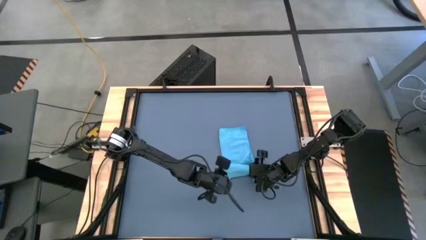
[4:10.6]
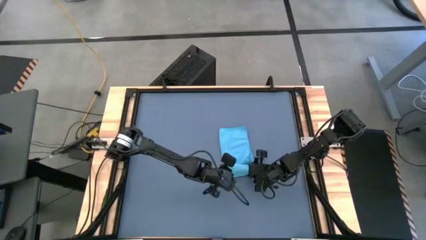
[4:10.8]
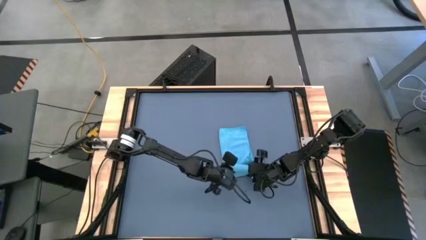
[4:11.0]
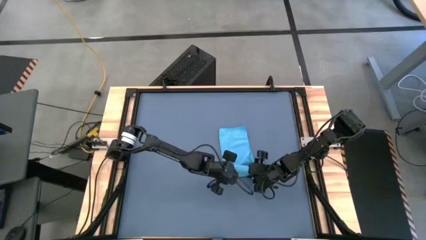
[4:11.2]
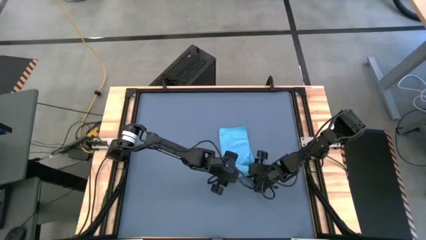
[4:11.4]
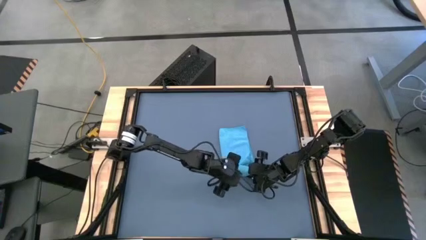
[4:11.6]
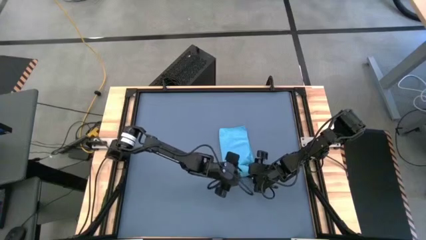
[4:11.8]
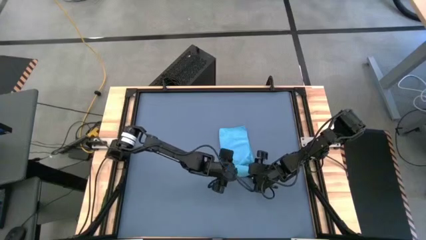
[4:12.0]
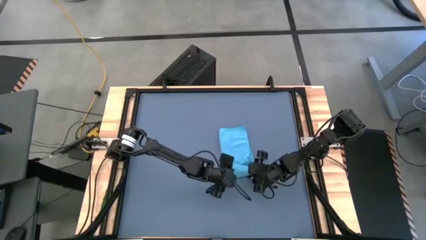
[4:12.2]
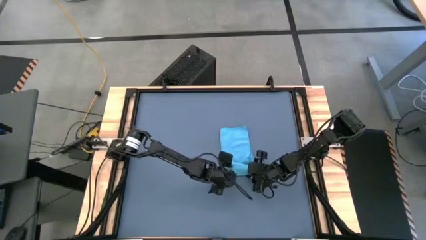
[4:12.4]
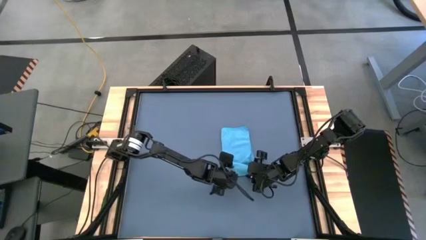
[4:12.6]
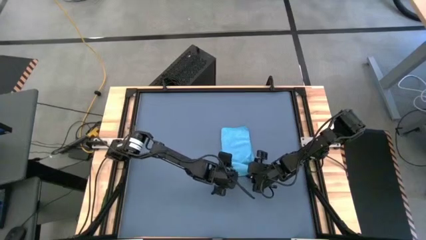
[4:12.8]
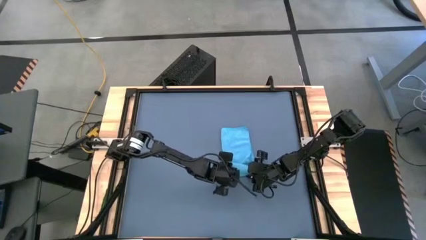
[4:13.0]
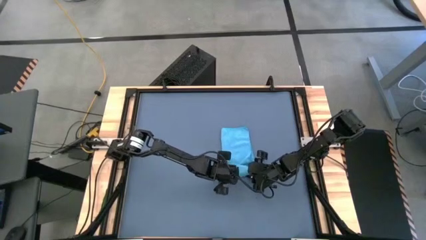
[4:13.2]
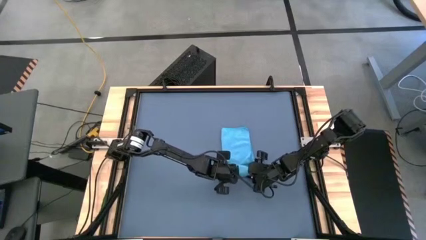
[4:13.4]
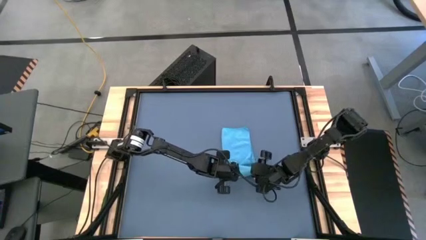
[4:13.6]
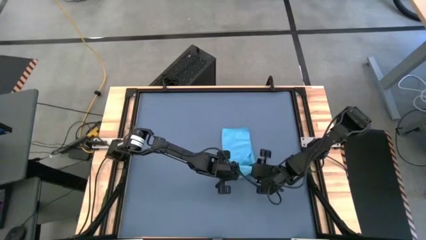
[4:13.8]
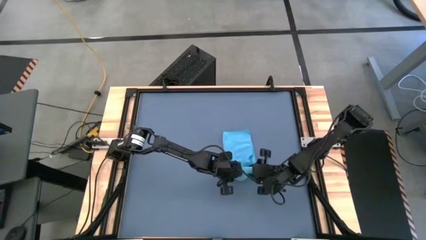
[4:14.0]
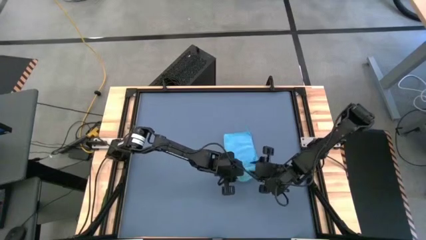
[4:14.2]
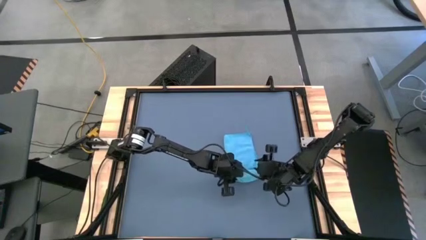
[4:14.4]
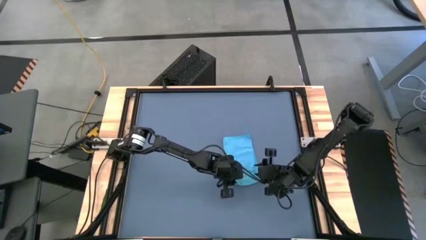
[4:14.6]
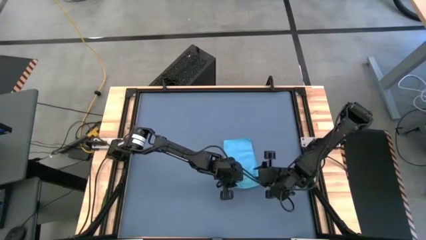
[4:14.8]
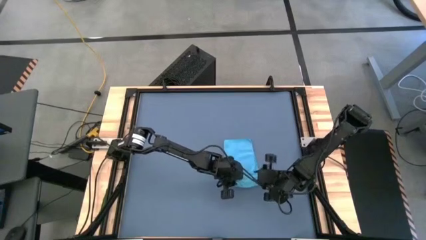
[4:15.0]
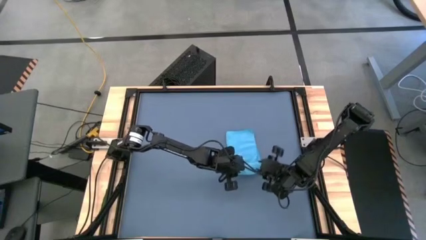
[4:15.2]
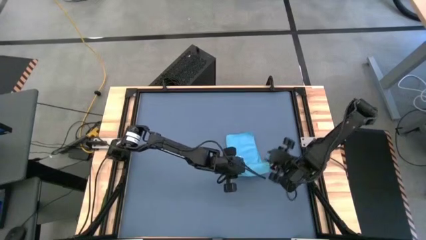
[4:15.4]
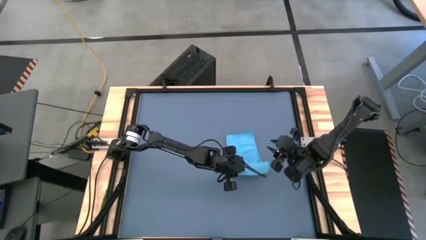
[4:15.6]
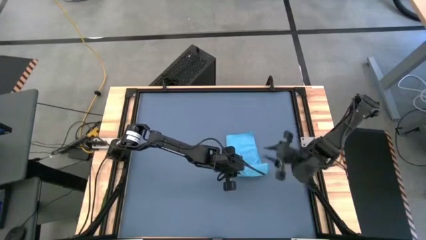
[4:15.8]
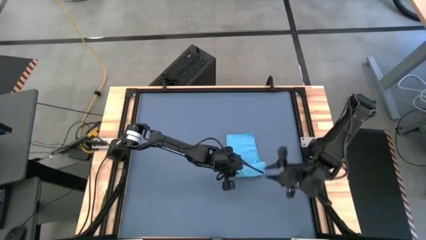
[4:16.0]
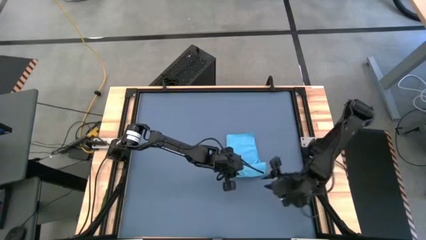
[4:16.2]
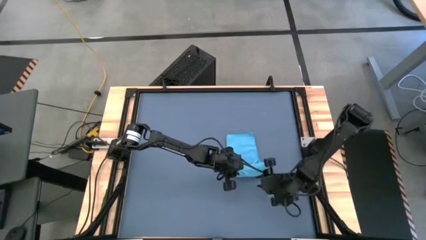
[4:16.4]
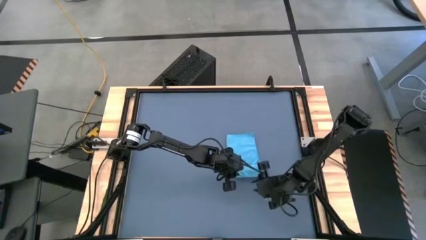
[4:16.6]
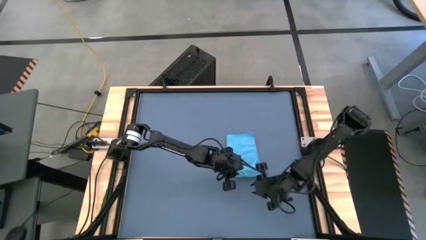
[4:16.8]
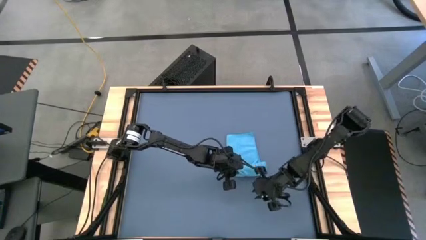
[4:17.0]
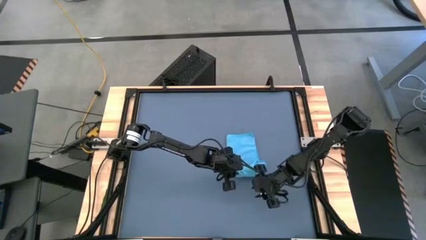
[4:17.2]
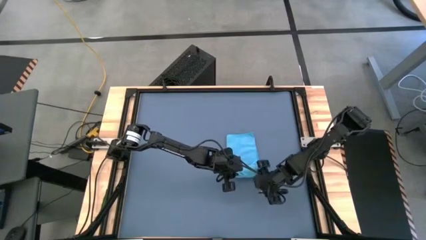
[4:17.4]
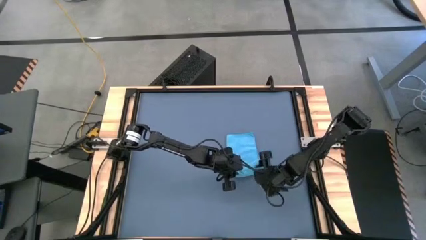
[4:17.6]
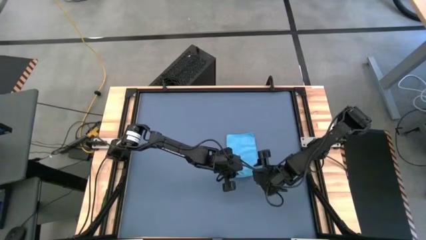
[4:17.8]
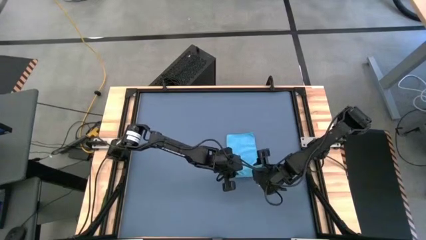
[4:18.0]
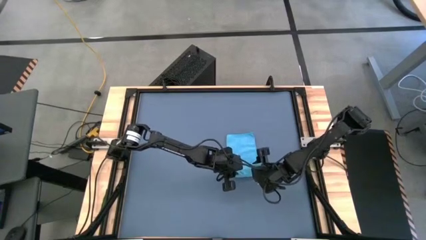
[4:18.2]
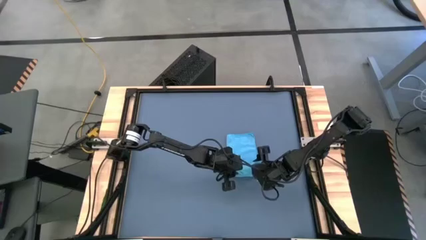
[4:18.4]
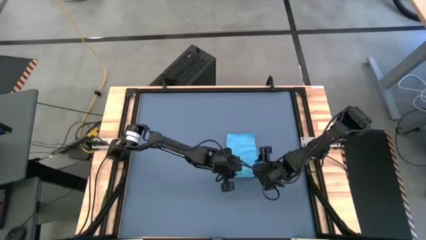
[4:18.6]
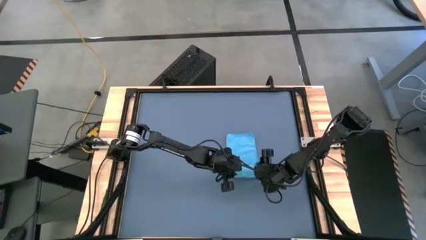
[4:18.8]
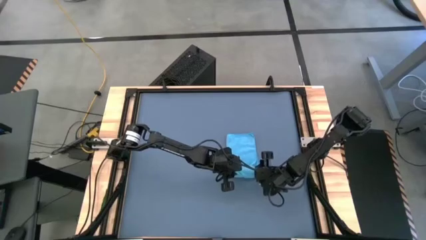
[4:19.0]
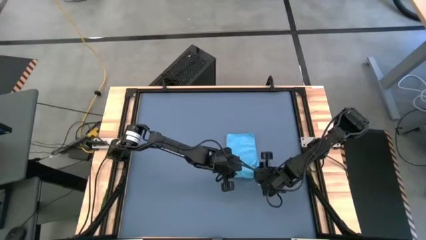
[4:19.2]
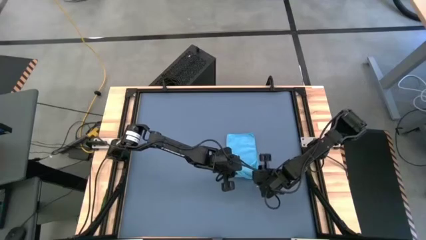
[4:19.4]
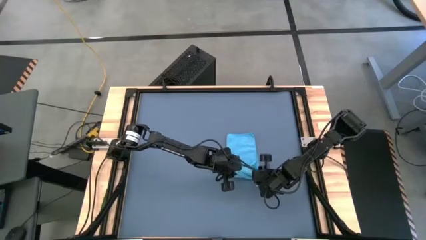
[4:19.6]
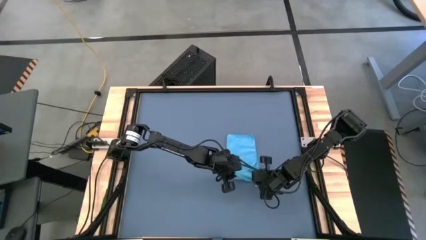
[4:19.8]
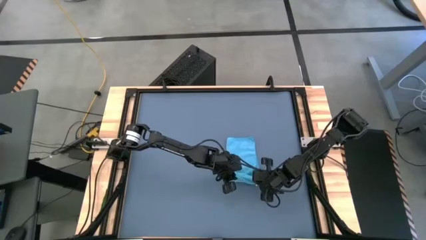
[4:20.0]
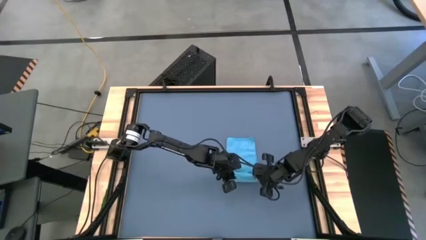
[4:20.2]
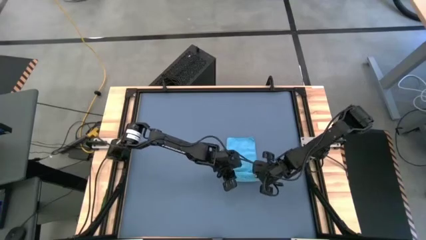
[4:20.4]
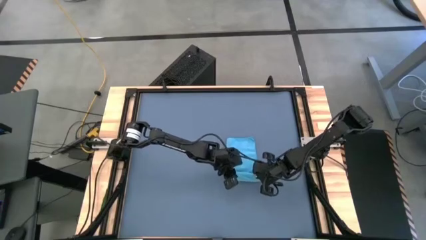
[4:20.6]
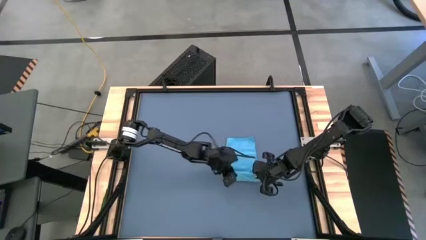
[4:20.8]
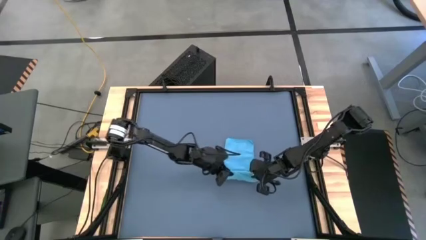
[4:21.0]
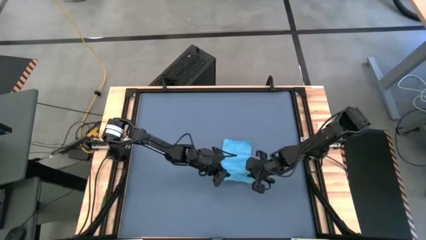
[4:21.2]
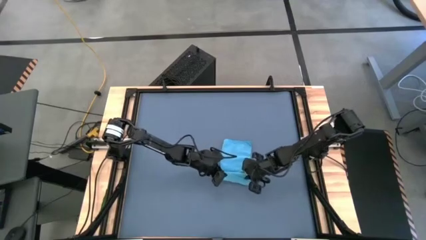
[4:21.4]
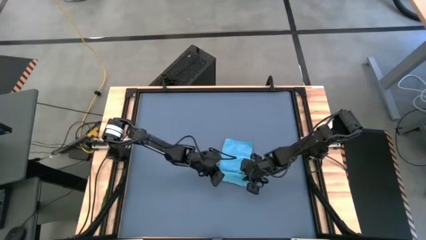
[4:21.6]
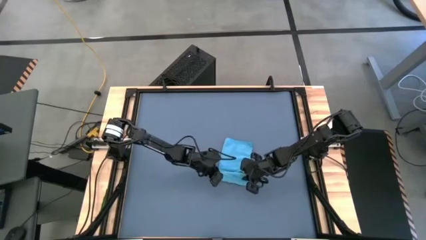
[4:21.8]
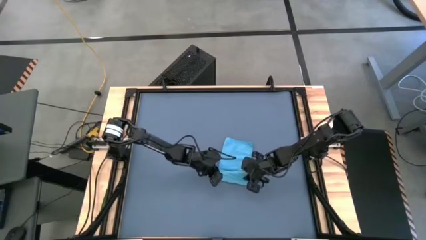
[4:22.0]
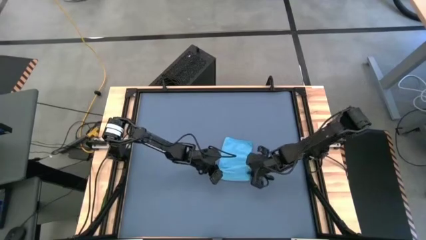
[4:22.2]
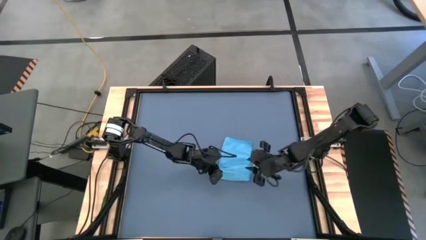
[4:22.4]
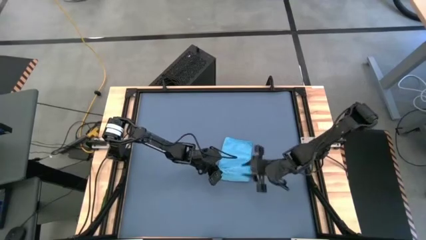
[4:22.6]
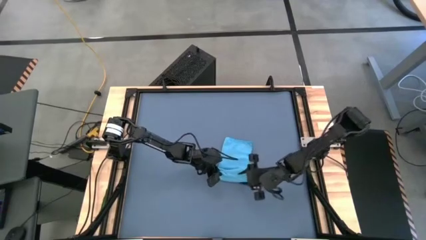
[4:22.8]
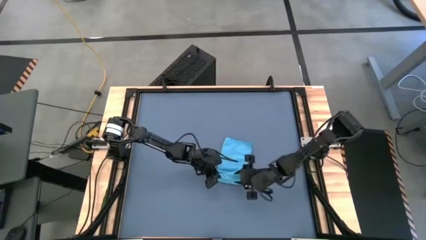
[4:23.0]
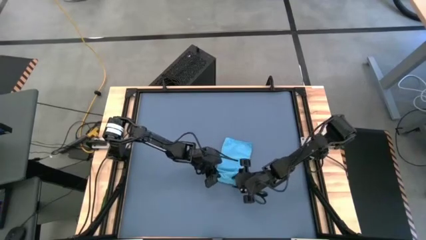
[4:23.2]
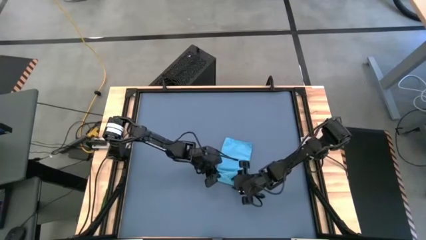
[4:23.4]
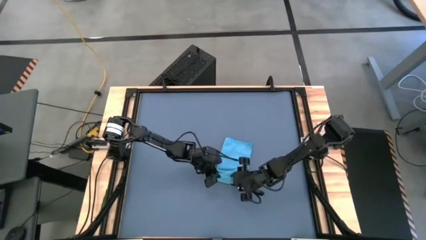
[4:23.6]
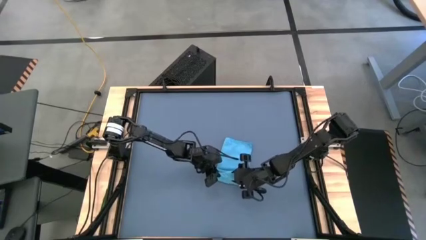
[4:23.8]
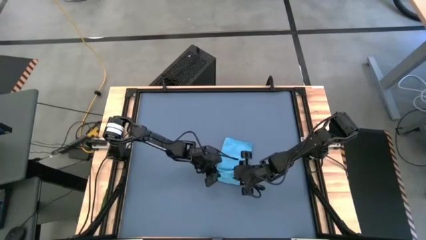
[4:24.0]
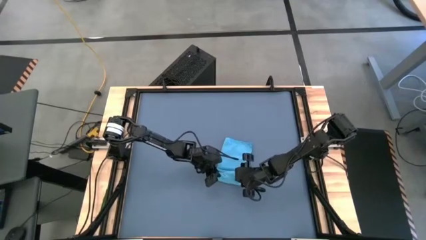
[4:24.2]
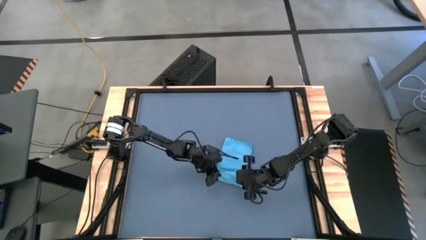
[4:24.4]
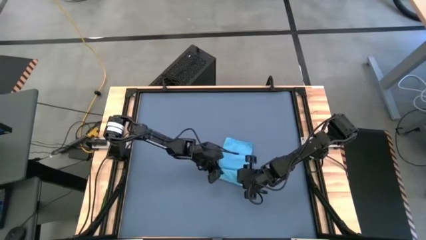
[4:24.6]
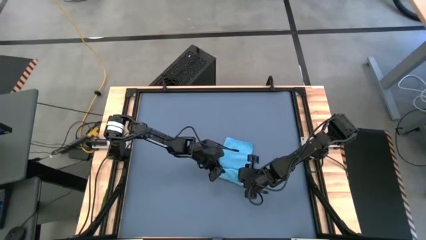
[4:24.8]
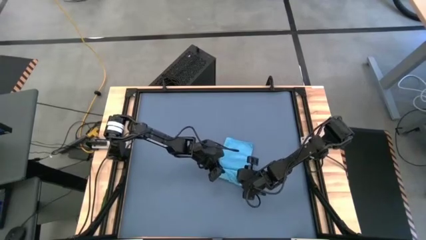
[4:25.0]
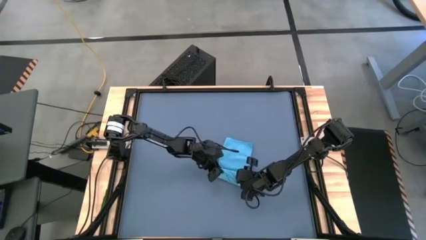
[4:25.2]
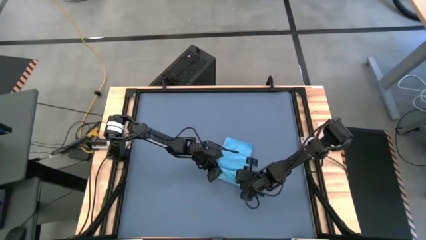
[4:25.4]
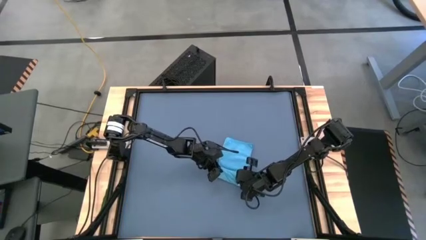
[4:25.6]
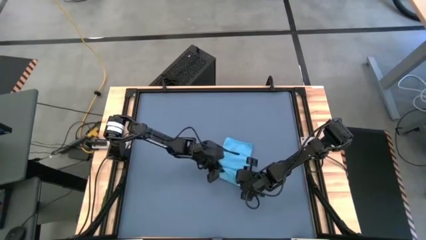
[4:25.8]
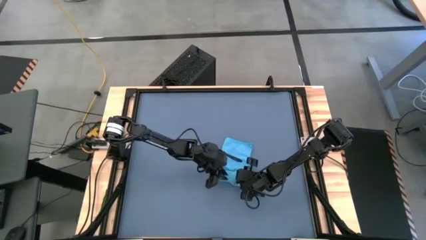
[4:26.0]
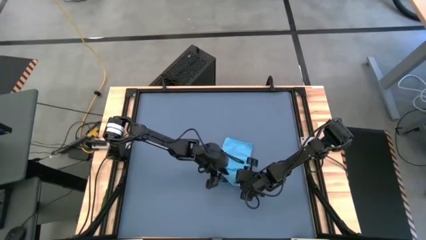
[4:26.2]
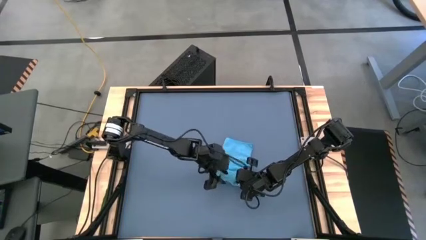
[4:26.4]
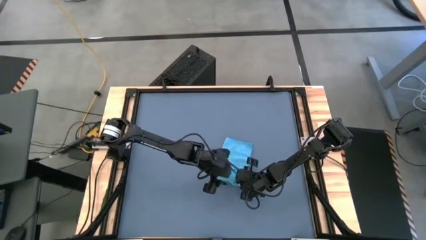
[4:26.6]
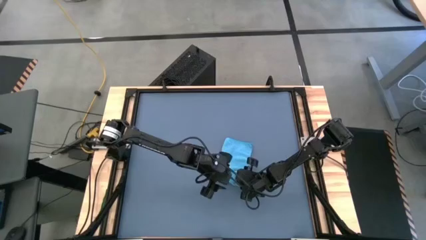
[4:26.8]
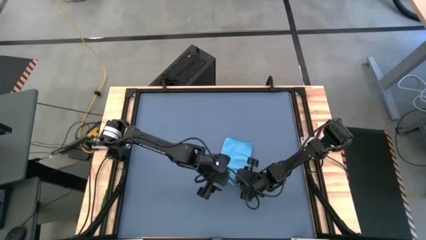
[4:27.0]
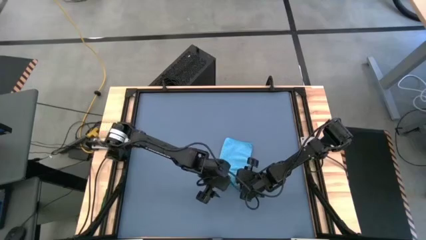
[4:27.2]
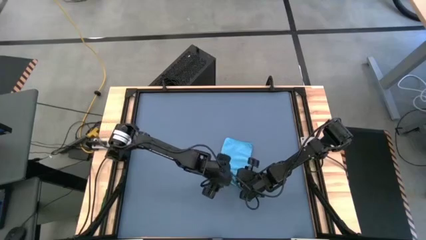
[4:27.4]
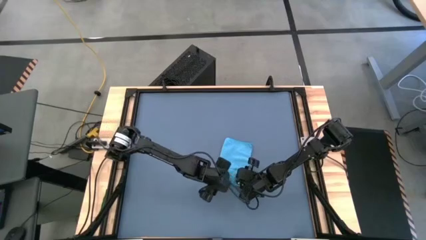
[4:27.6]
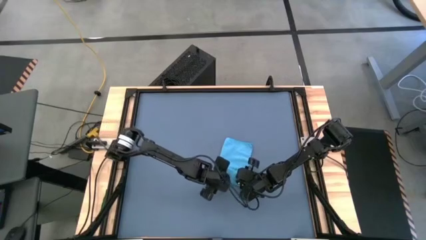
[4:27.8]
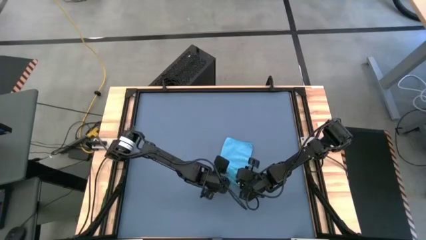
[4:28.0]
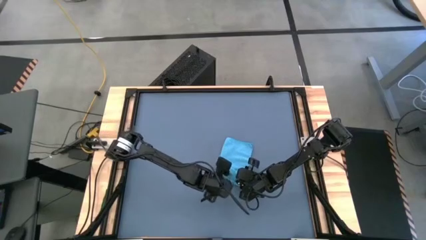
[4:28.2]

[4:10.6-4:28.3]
Task: Roll towel
Roll the blue microfiber towel
